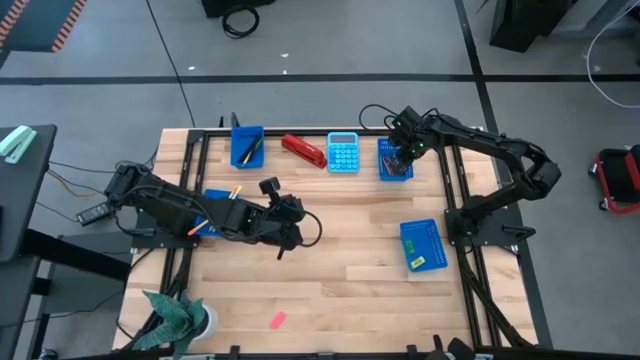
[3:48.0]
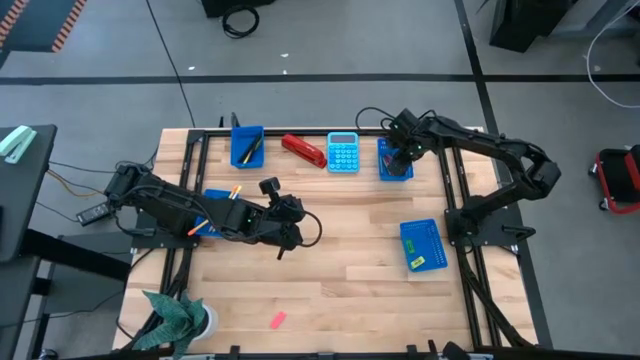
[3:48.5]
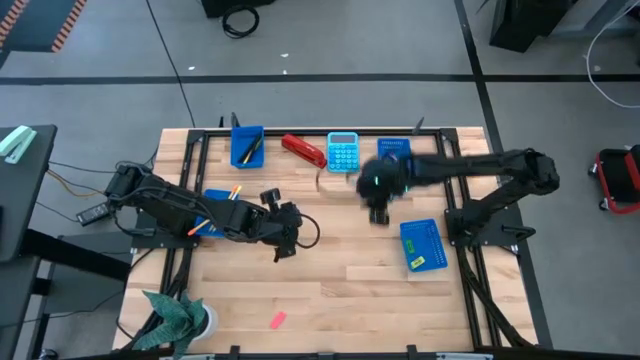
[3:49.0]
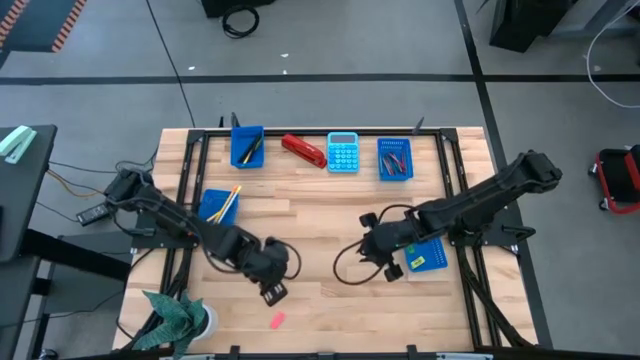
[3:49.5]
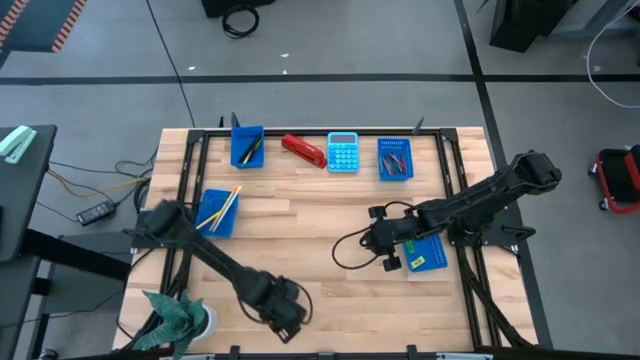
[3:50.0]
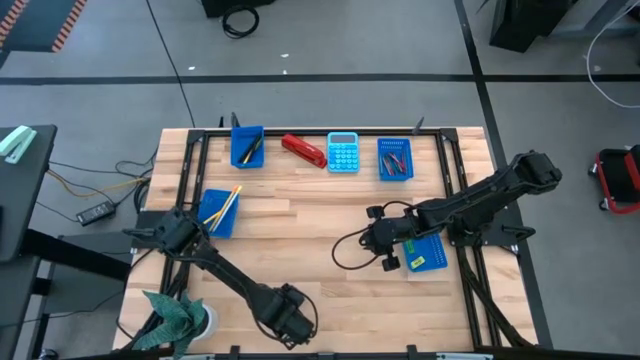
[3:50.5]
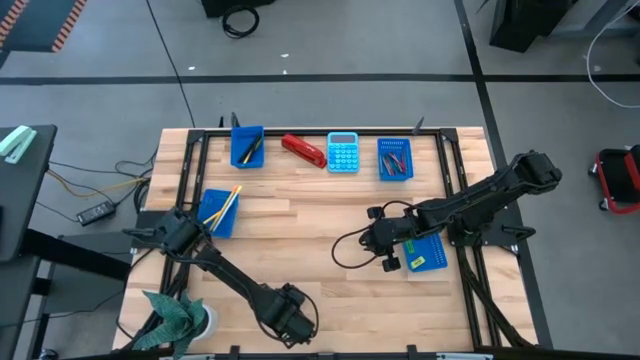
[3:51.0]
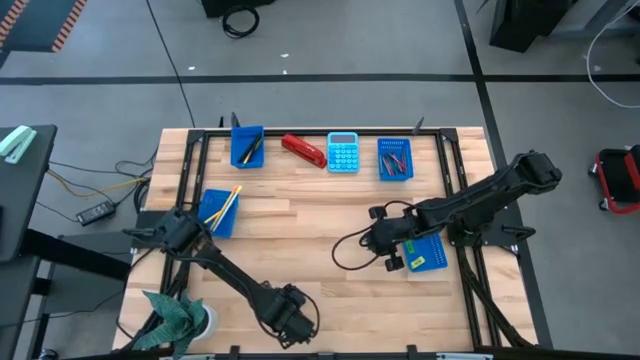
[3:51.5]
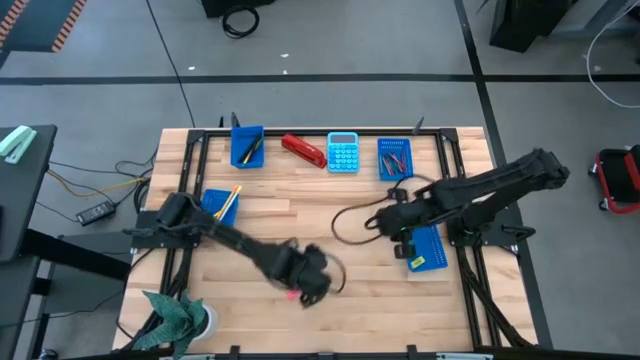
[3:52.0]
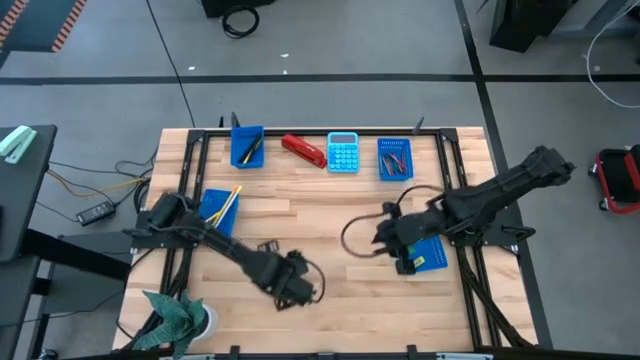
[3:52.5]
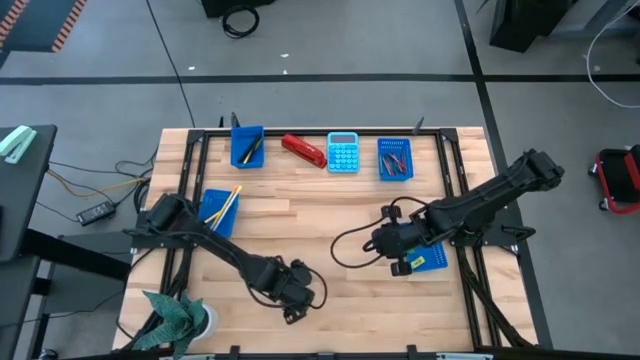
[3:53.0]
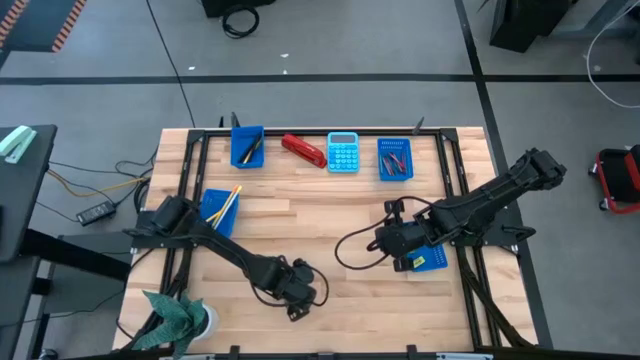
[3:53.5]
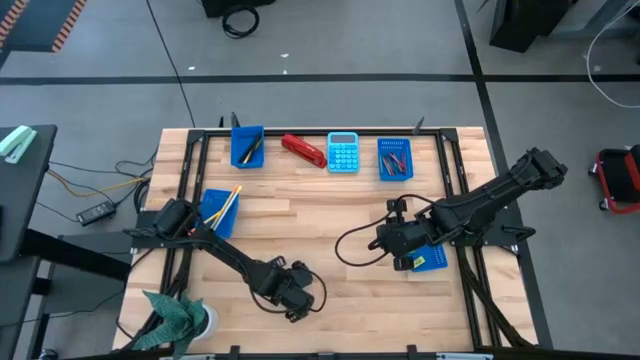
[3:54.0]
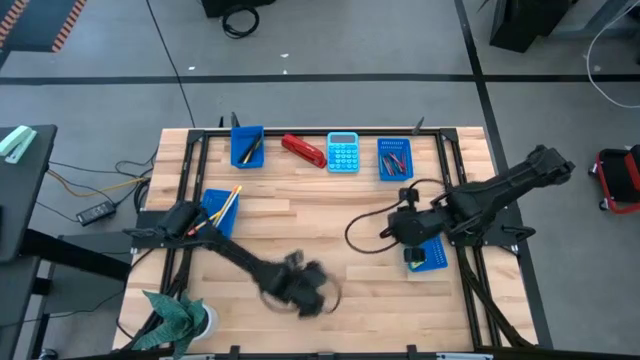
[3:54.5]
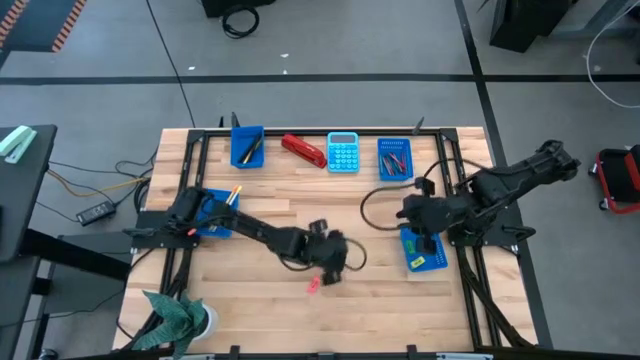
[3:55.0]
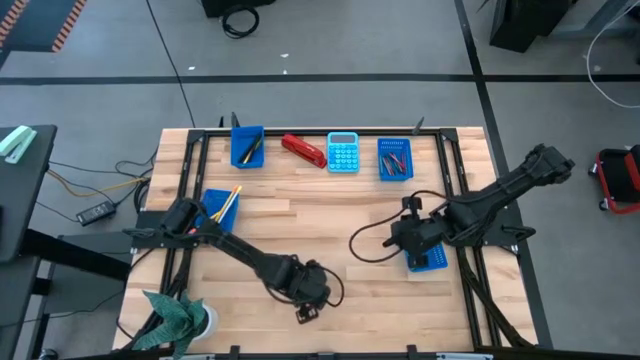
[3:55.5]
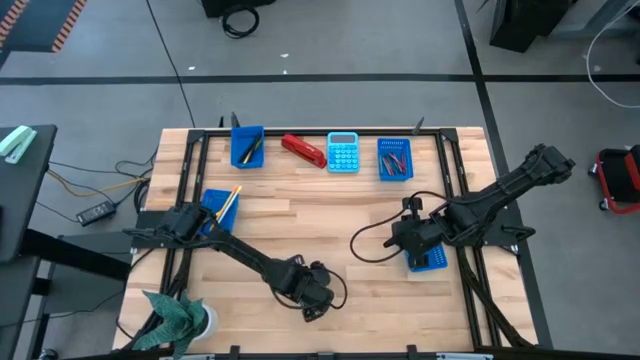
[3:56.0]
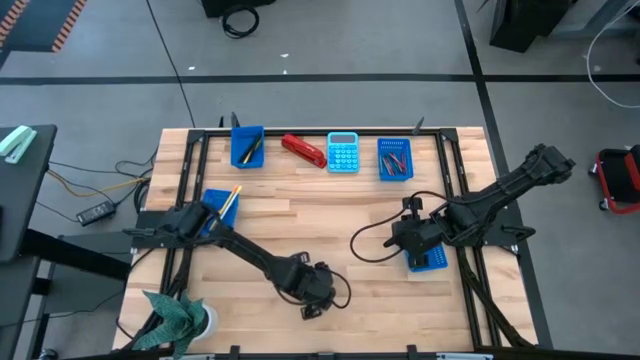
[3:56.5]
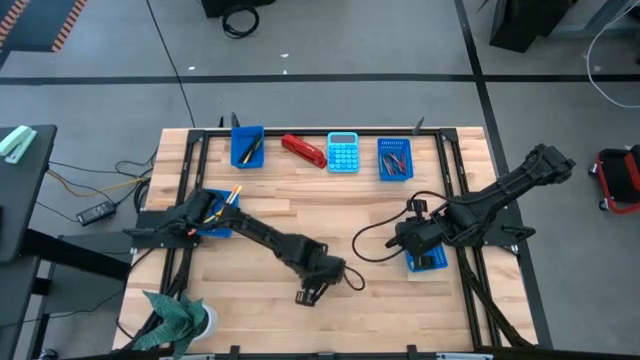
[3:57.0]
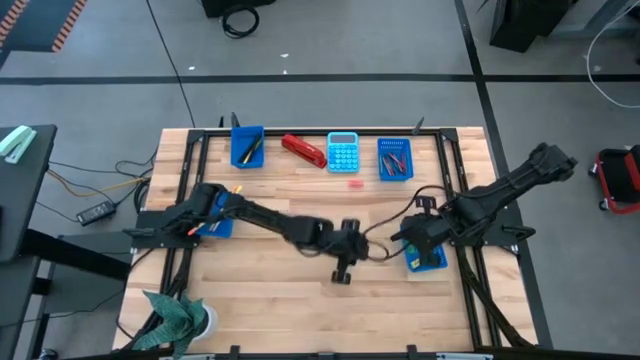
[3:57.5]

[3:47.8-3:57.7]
Task: Sort crayons/erasers/pens/pencils in bins
Put the pink eraser into the bottom right bin

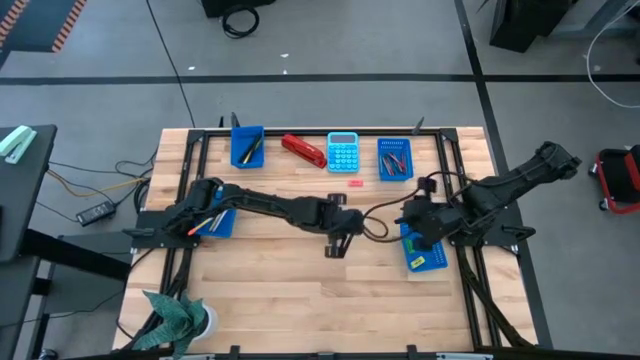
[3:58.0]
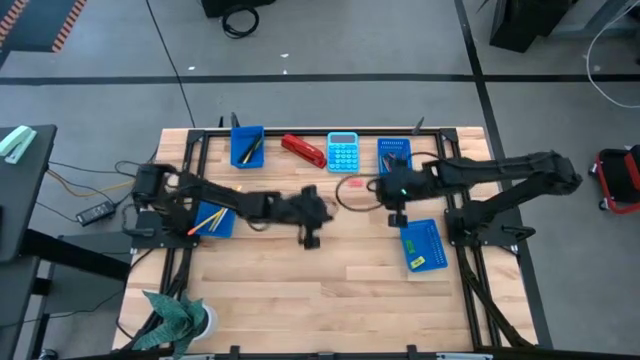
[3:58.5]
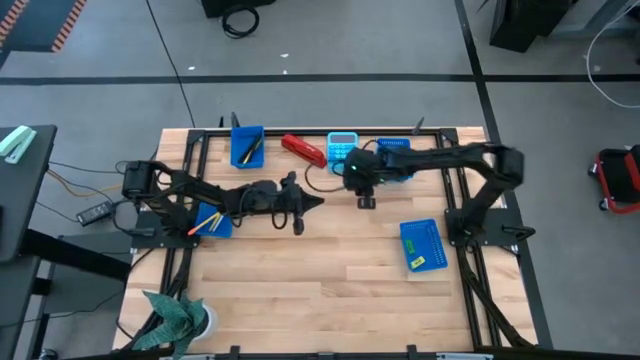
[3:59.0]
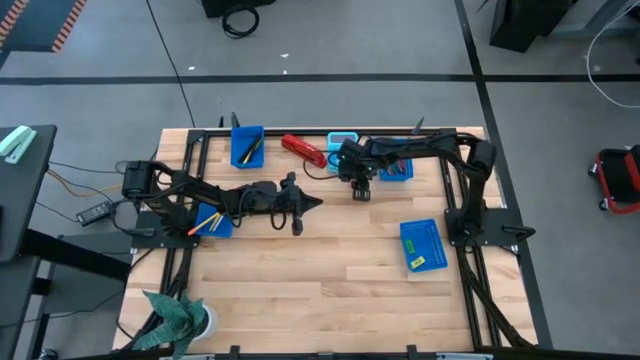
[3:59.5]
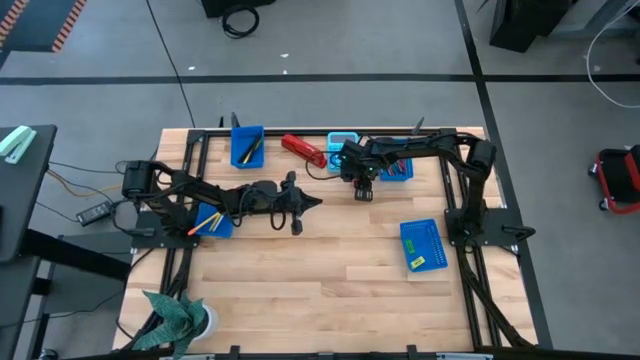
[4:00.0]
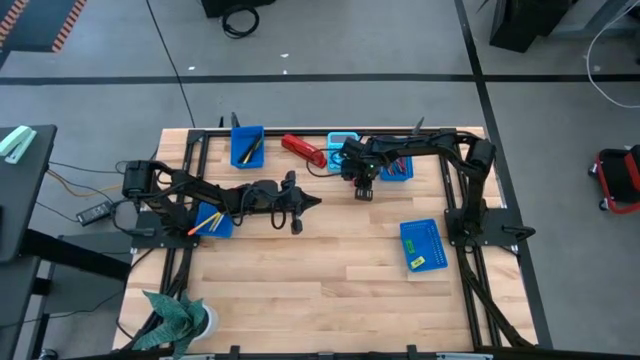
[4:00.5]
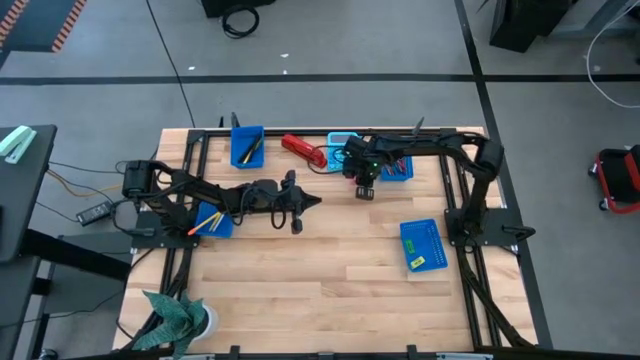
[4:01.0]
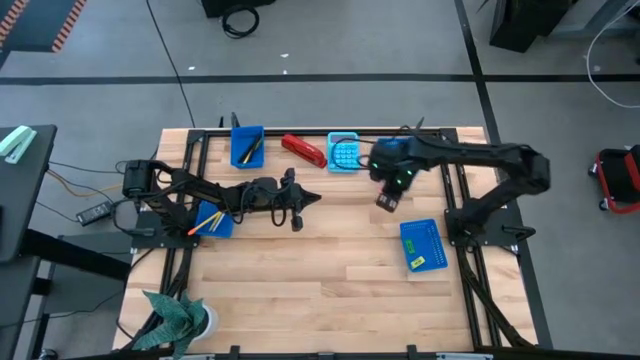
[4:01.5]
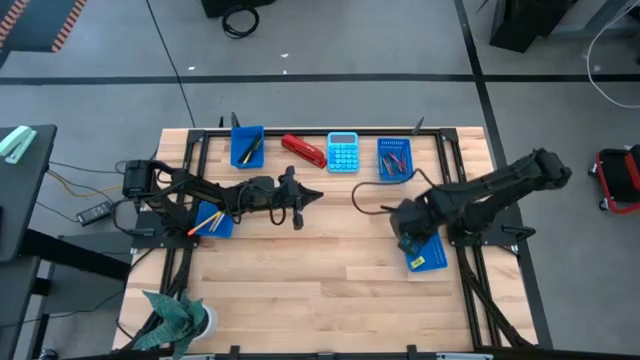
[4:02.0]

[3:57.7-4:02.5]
Put the pink eraser into the bottom right bin

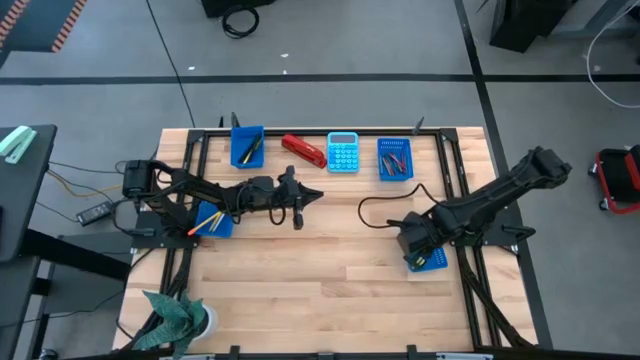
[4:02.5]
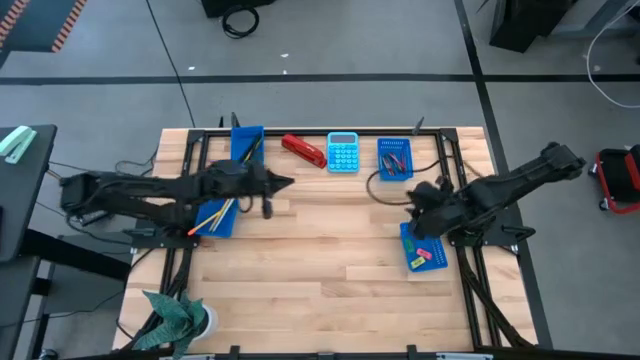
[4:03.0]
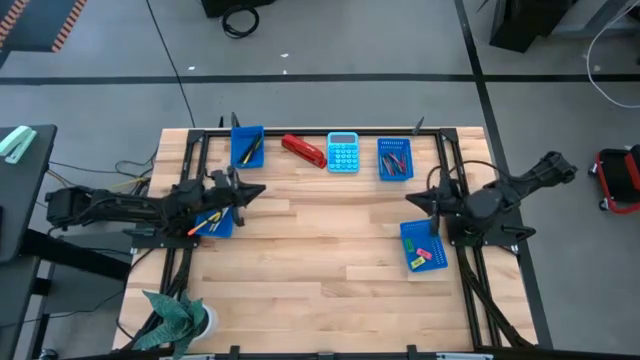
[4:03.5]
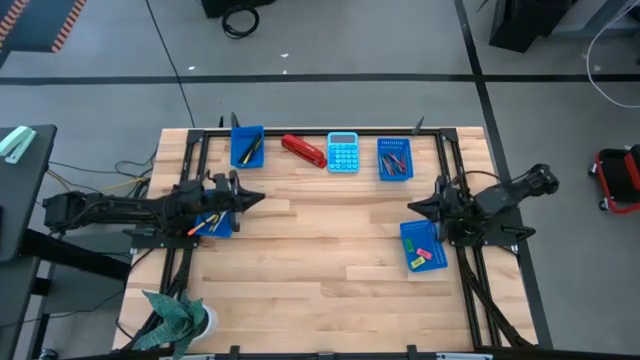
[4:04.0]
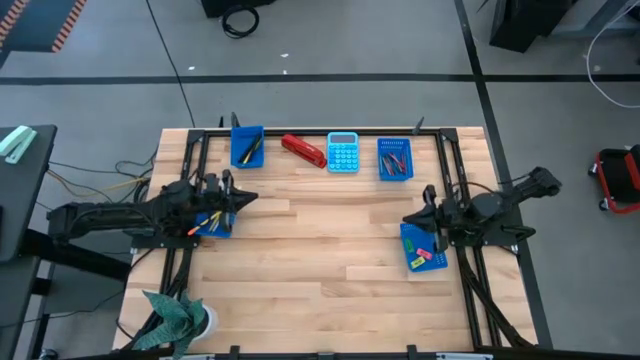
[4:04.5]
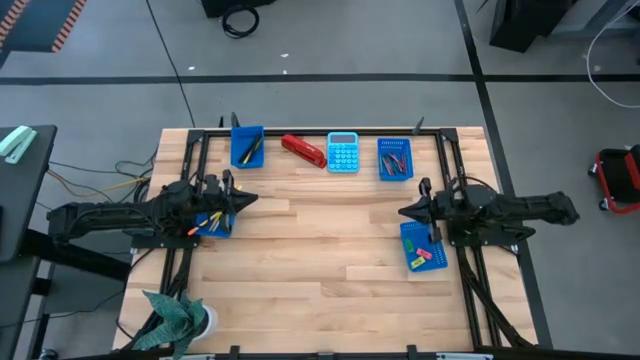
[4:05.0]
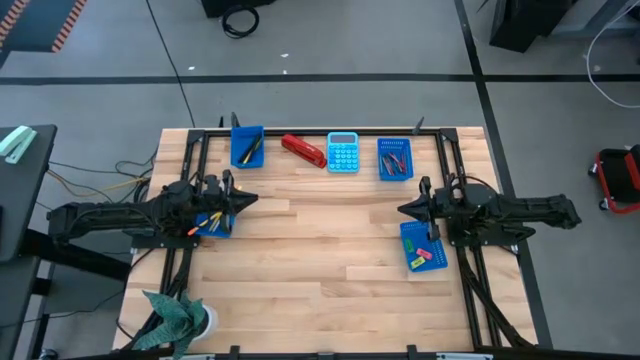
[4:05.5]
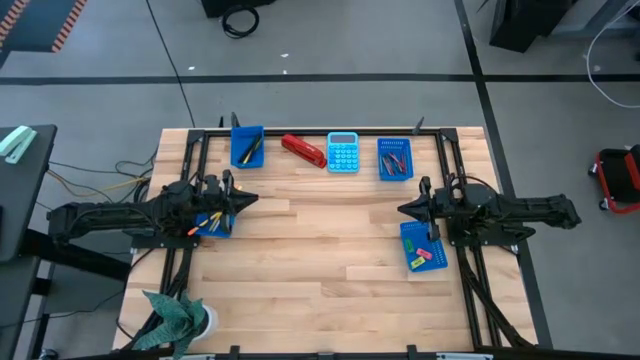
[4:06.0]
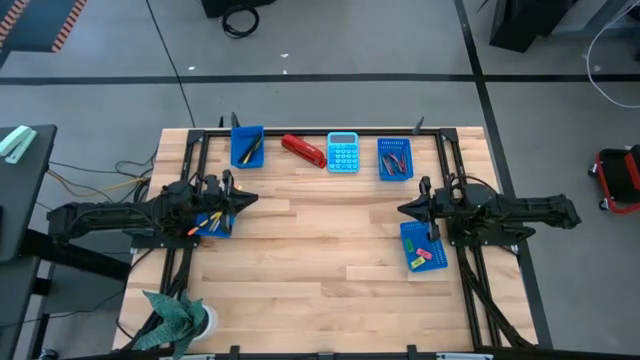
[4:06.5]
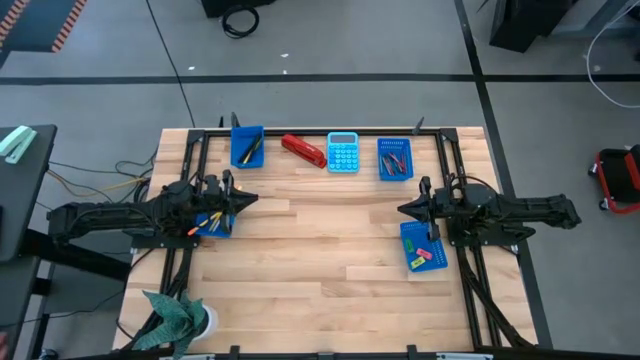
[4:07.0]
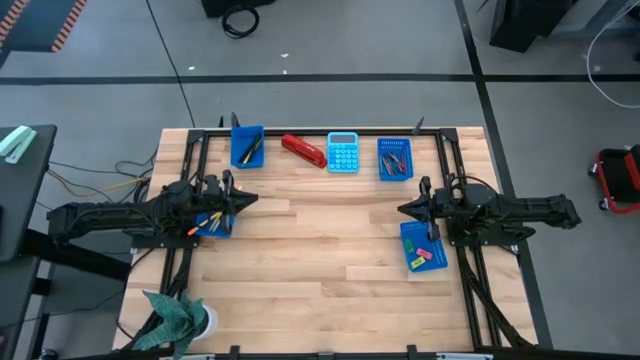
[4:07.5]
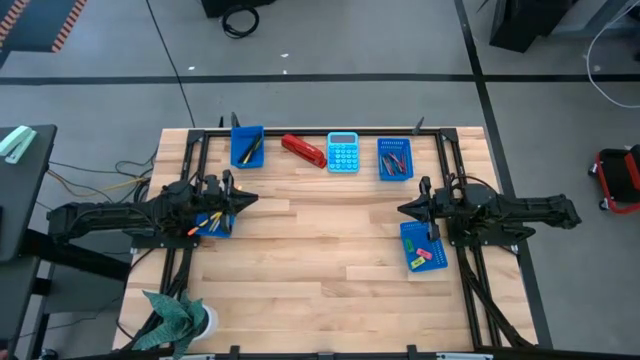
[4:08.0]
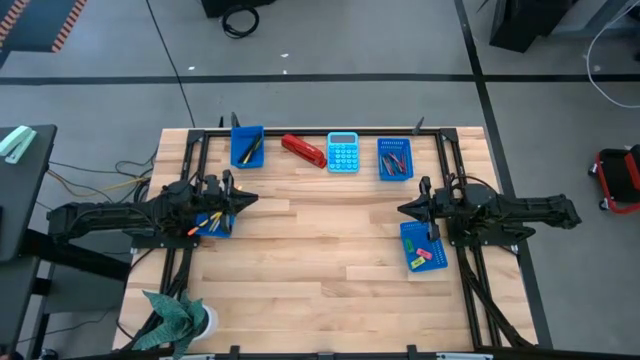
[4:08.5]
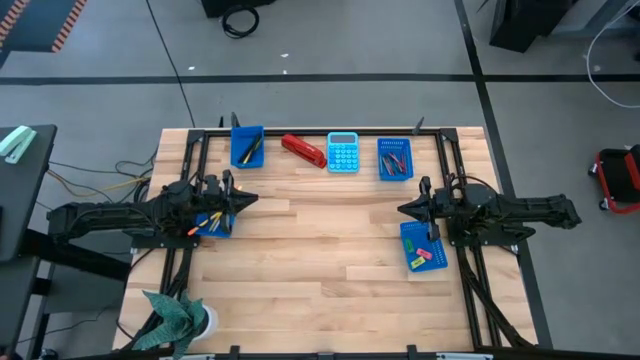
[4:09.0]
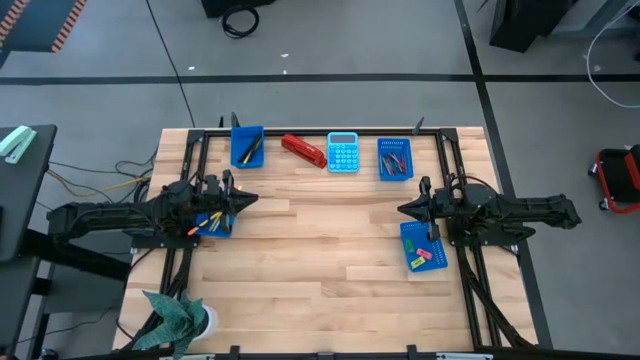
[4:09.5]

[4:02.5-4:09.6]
Return to Home Position
